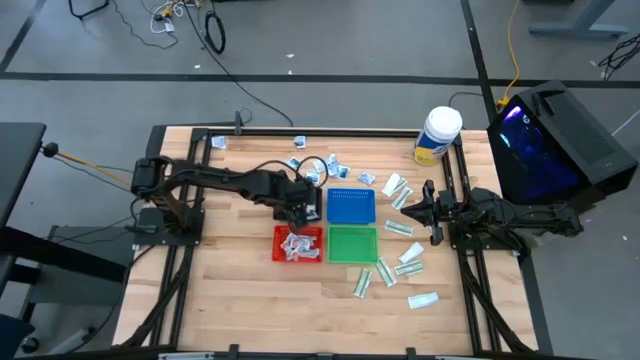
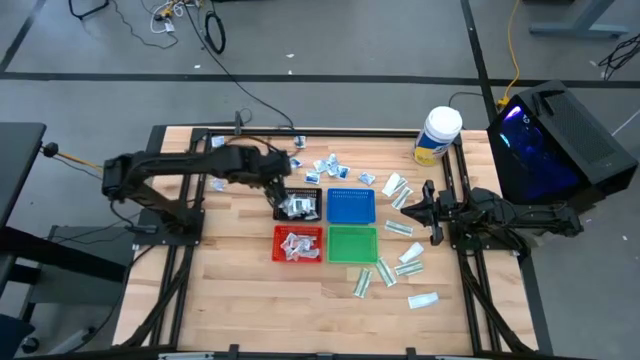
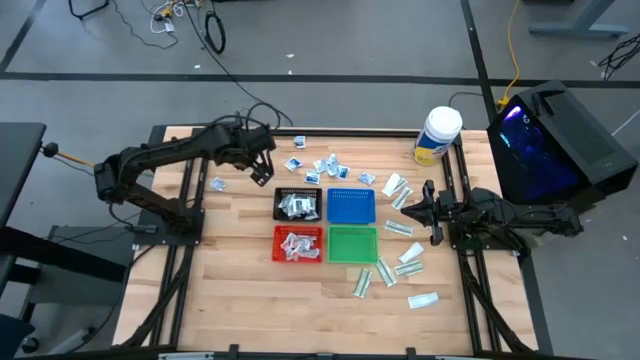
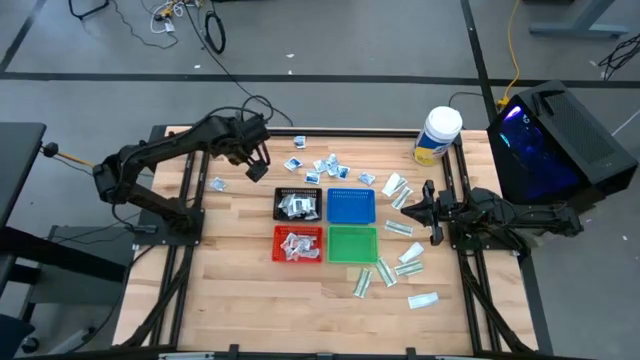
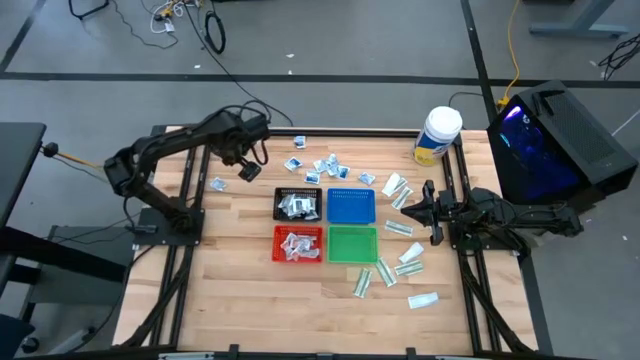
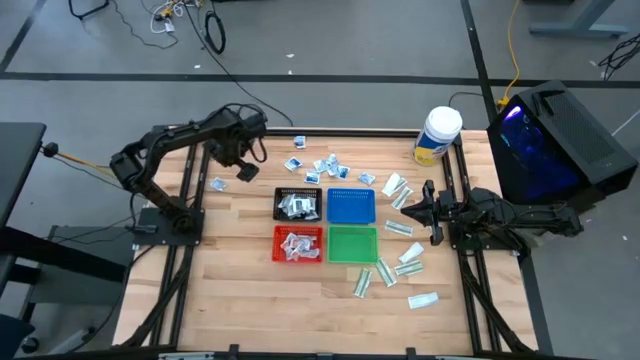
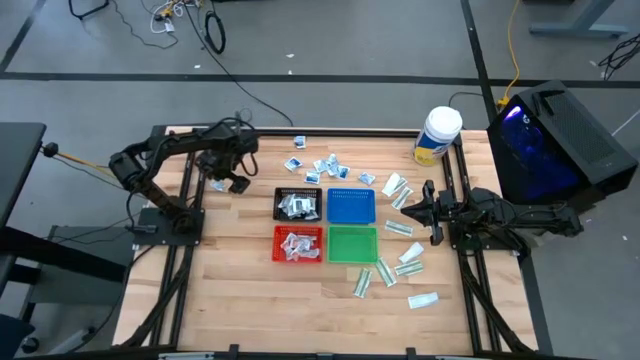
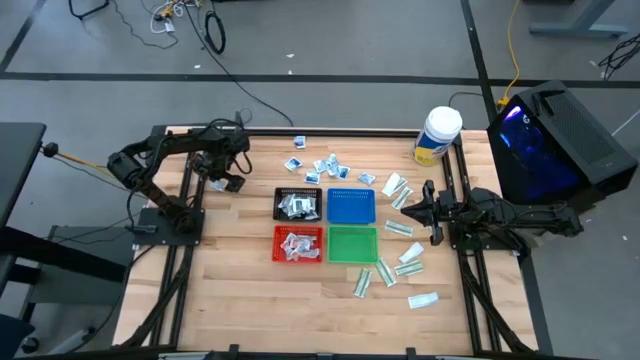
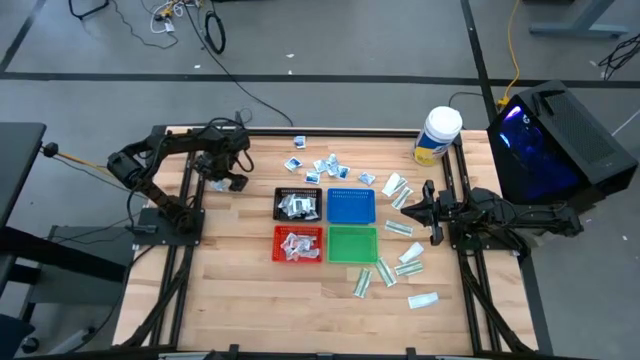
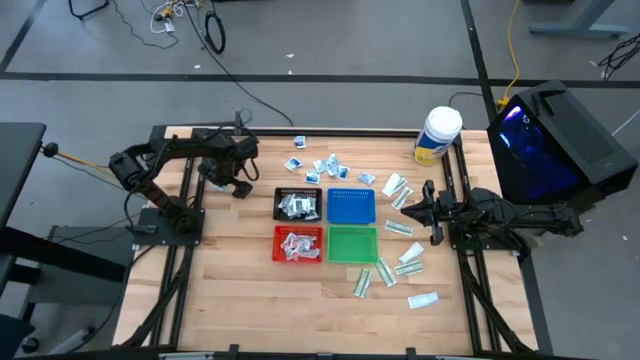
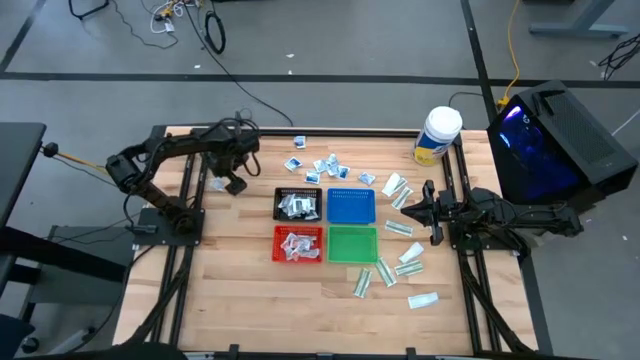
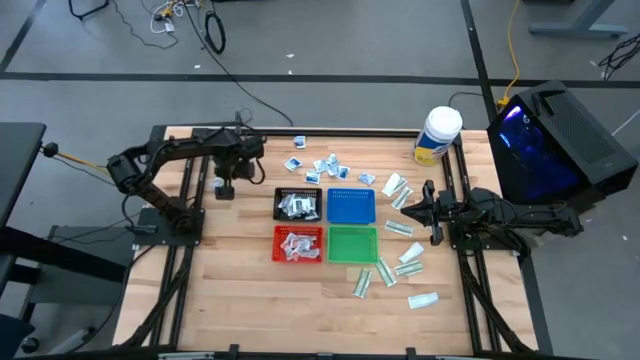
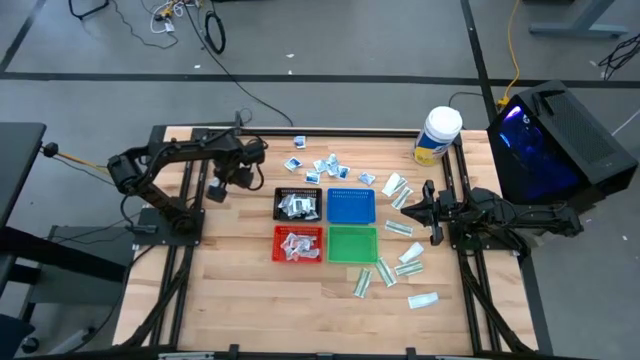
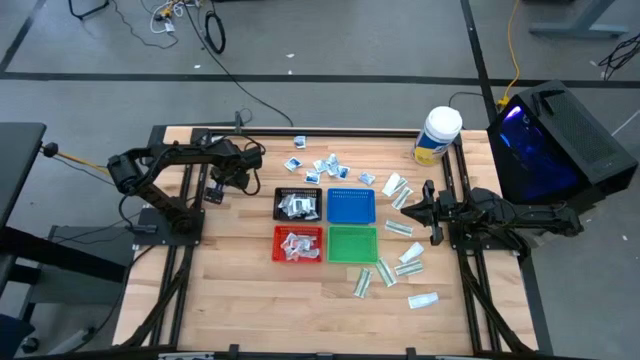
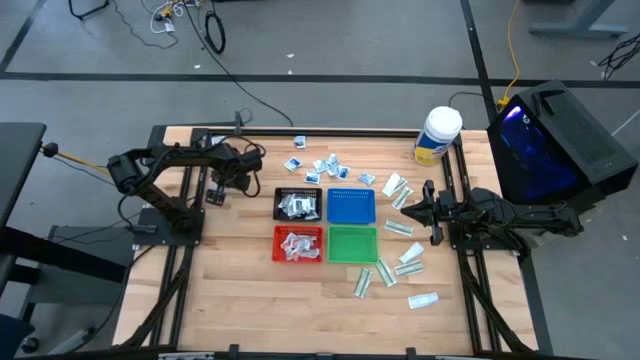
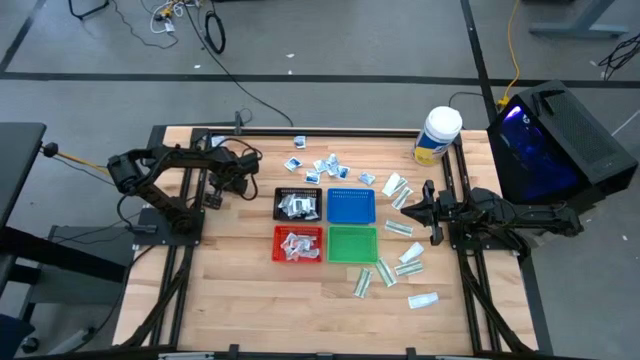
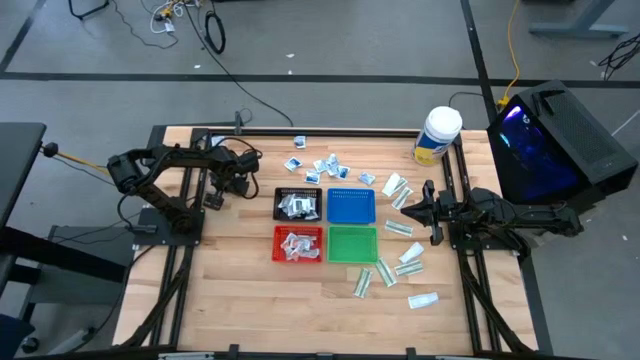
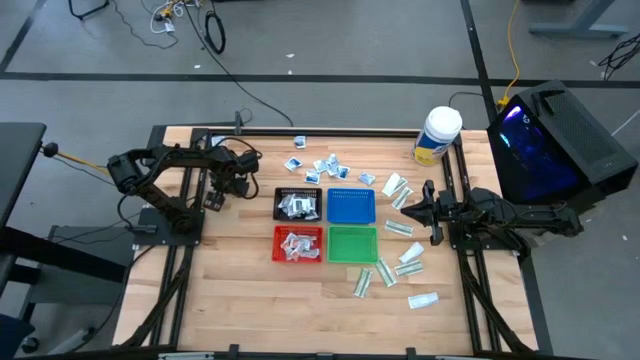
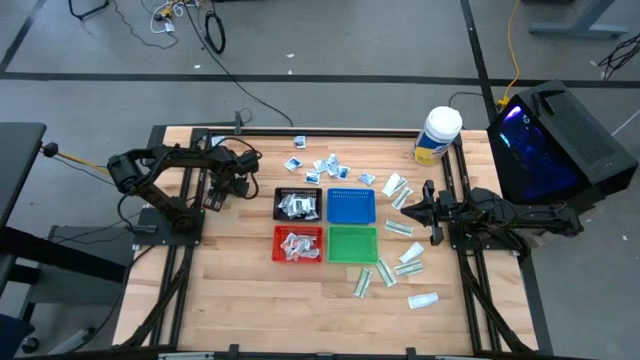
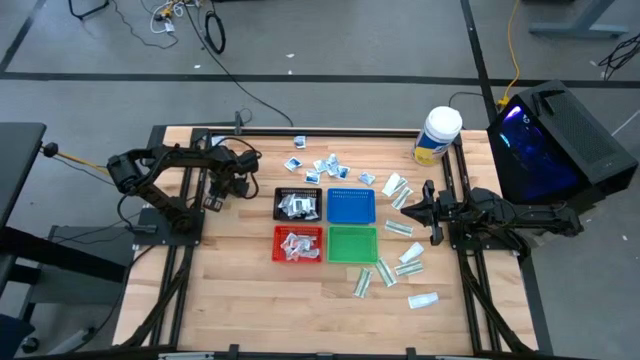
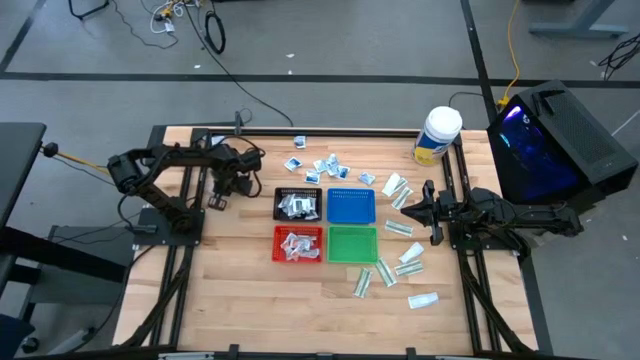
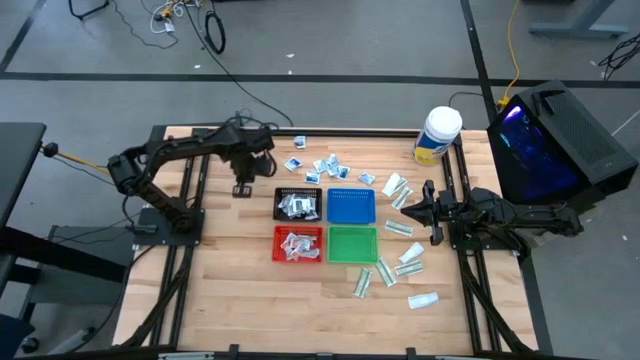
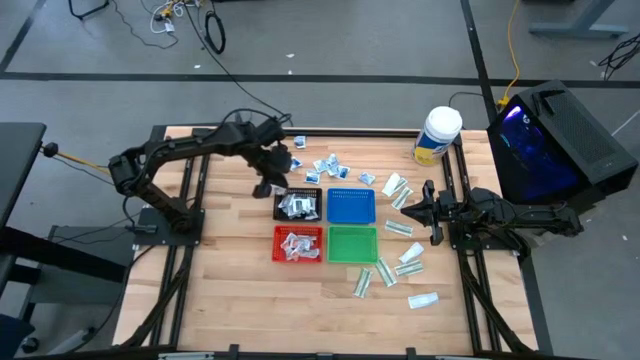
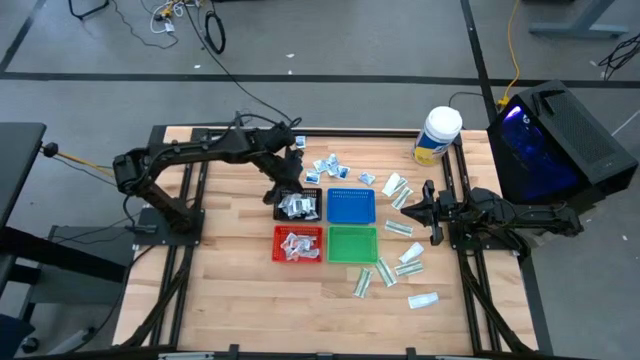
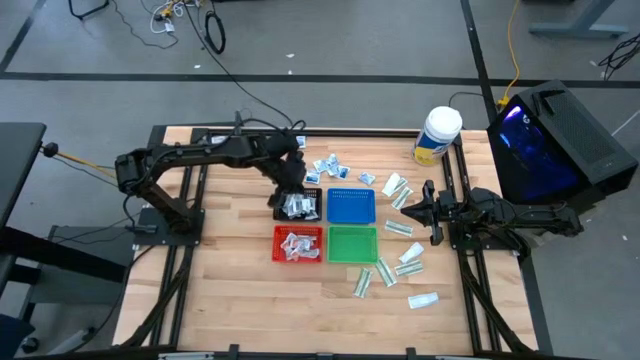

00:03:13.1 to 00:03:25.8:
Task: Pick & Place First Aid Supplies
Put the gray towelette pack into the black bin

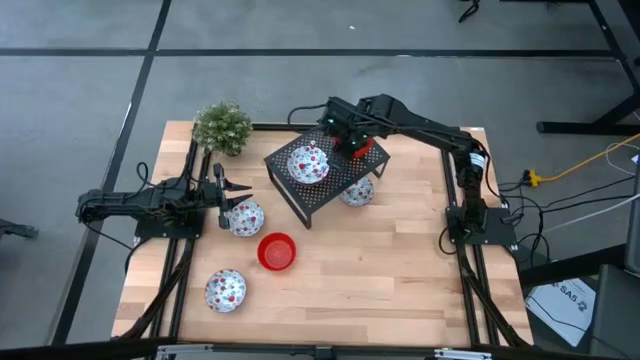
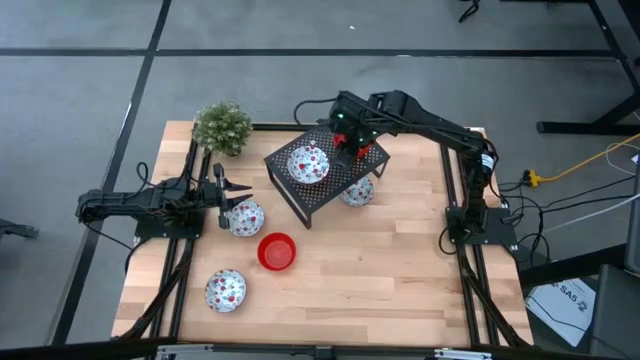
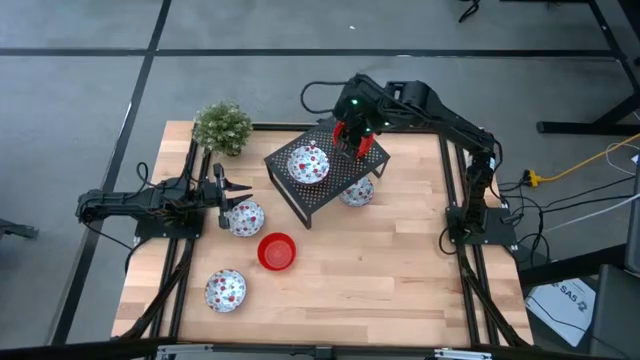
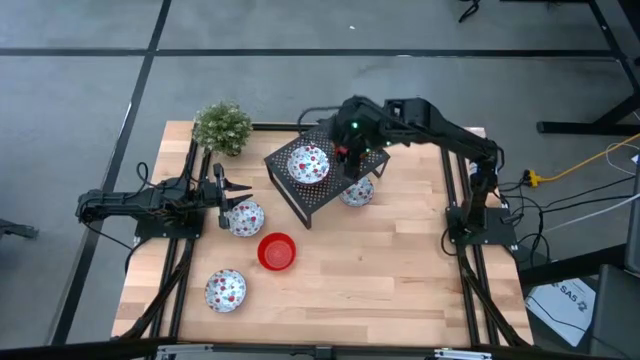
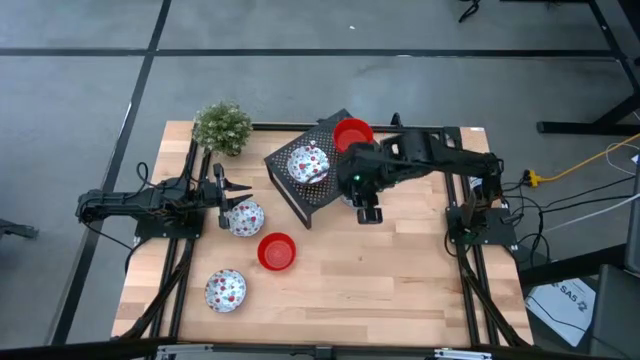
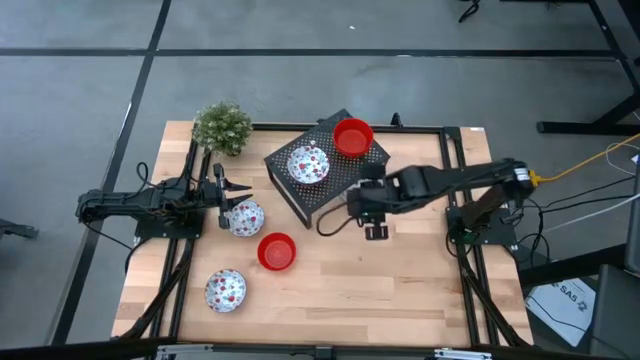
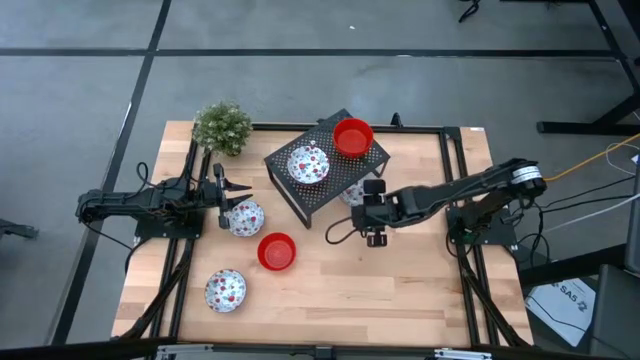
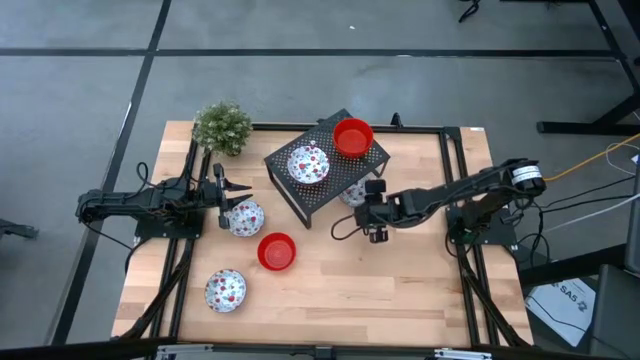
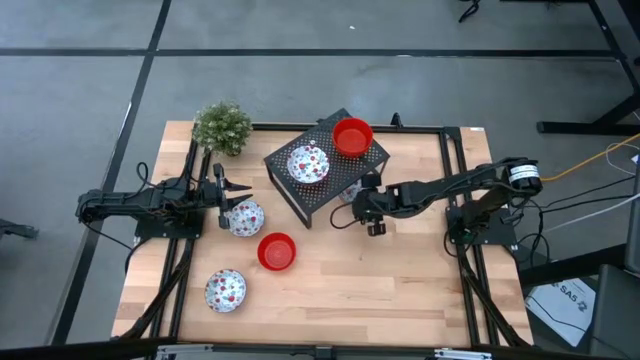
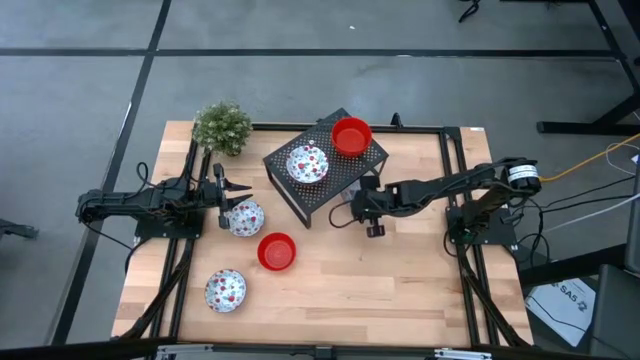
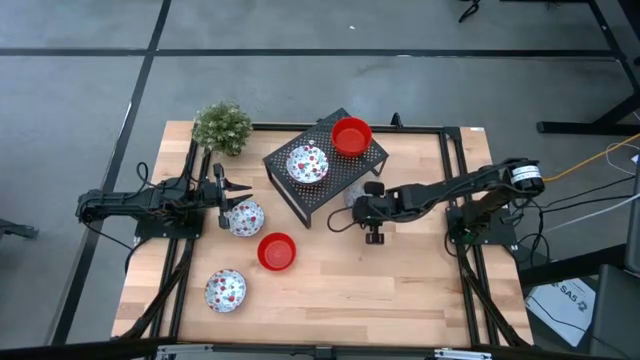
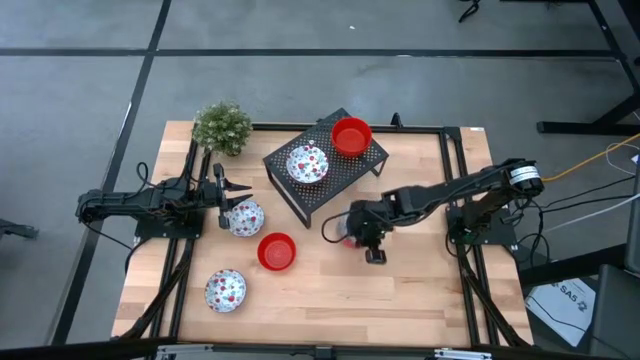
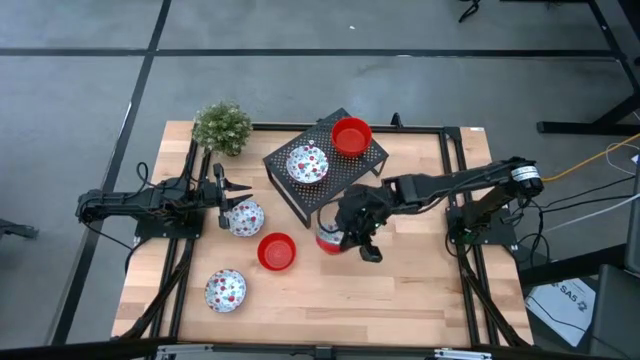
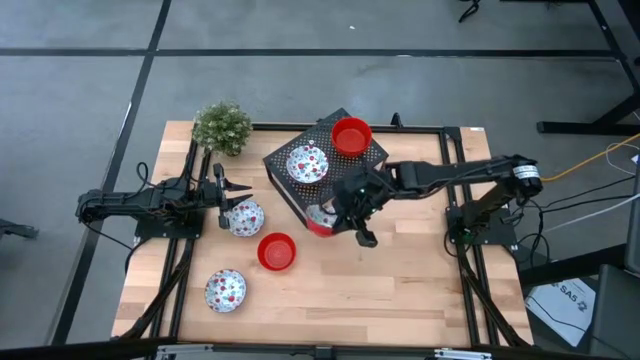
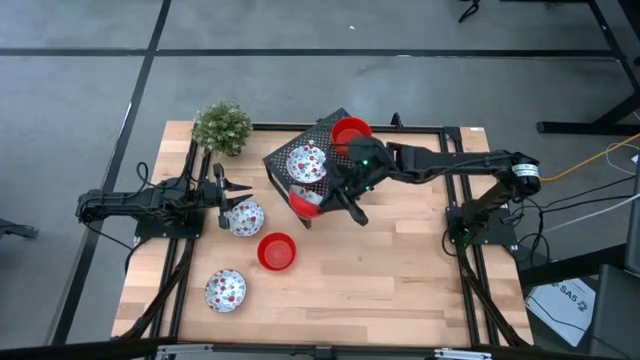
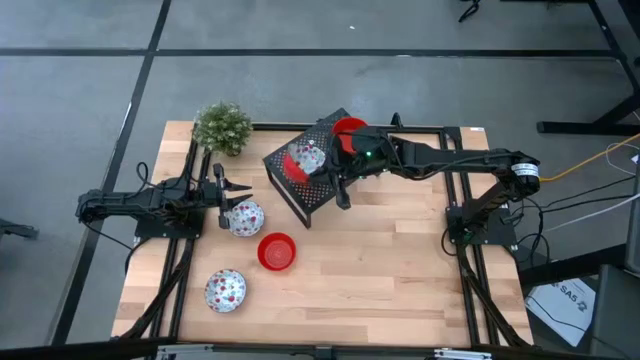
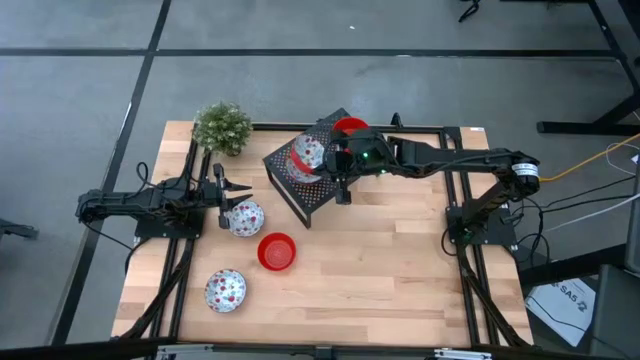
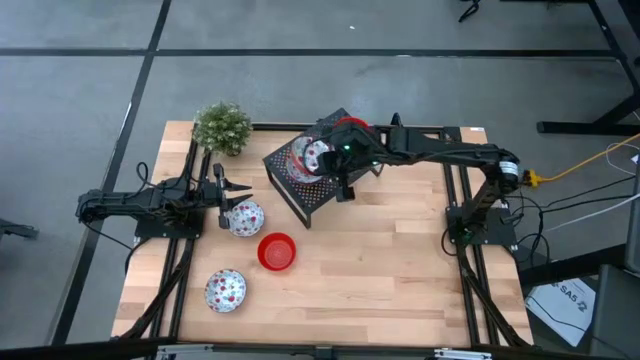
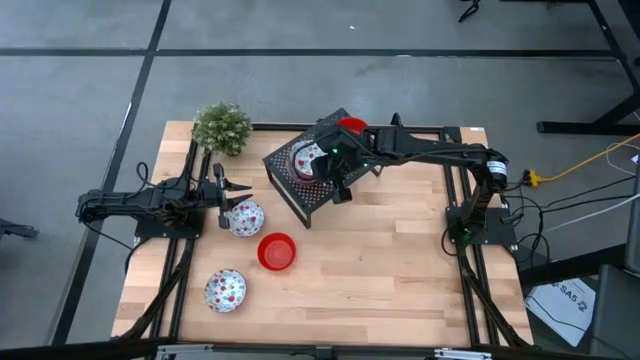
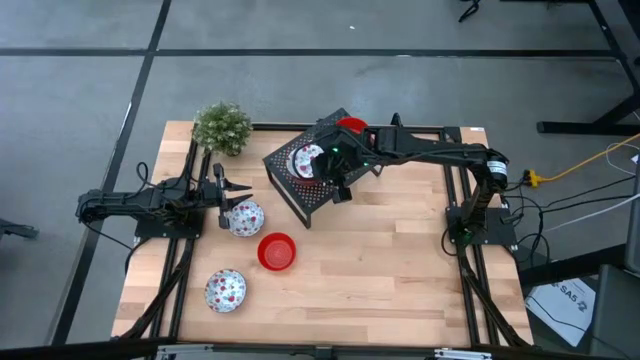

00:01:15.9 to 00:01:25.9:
Task: Pick & Place Mini bowls
Stack the white patterned bowl on the white patterned bowl on the shelf
